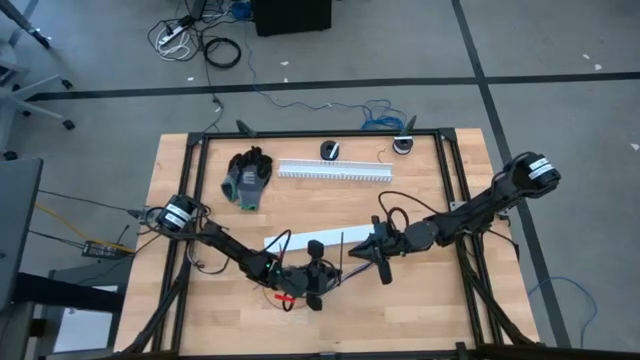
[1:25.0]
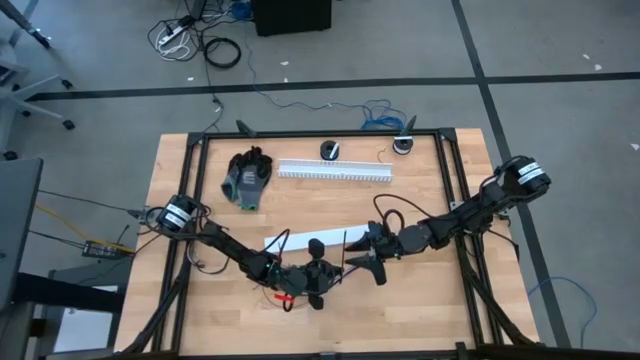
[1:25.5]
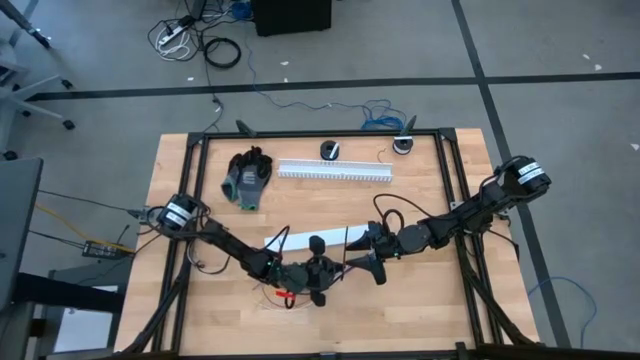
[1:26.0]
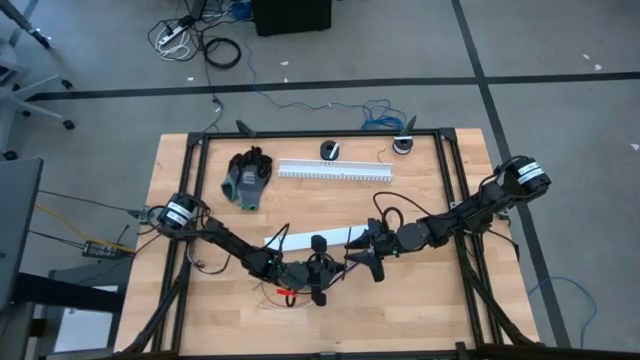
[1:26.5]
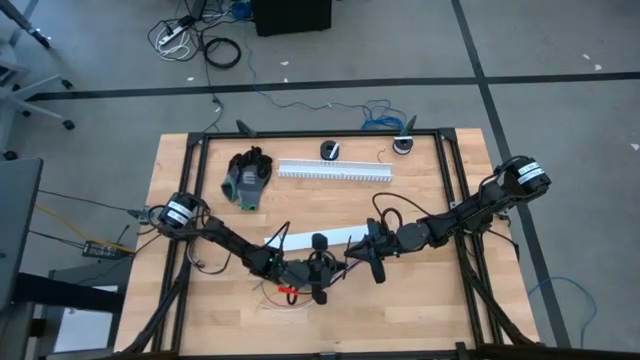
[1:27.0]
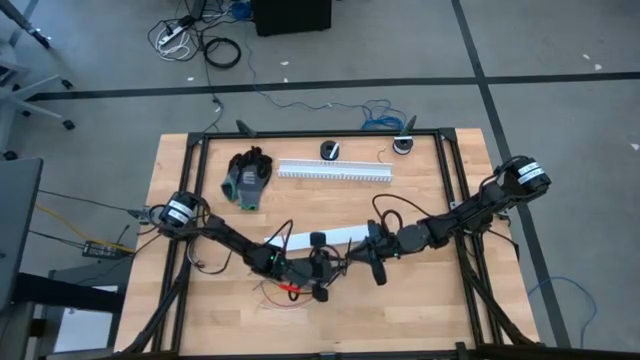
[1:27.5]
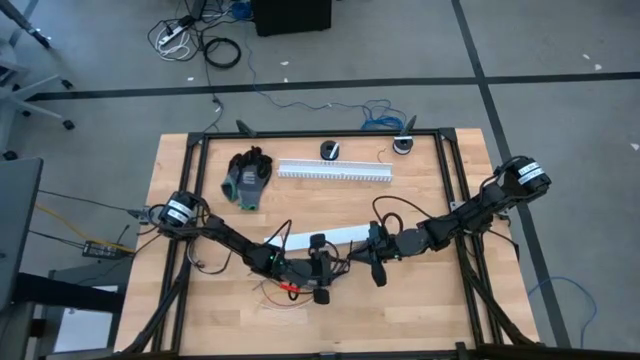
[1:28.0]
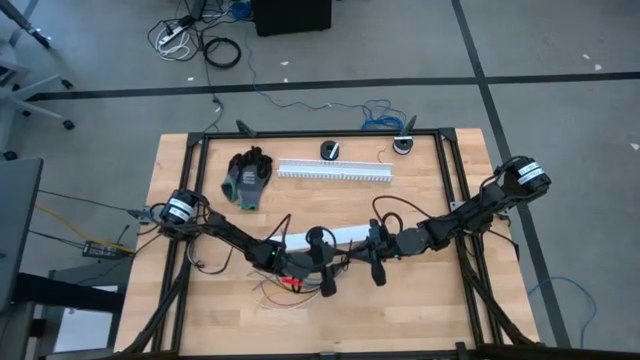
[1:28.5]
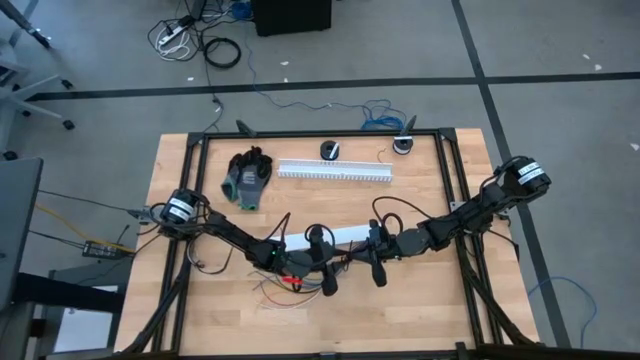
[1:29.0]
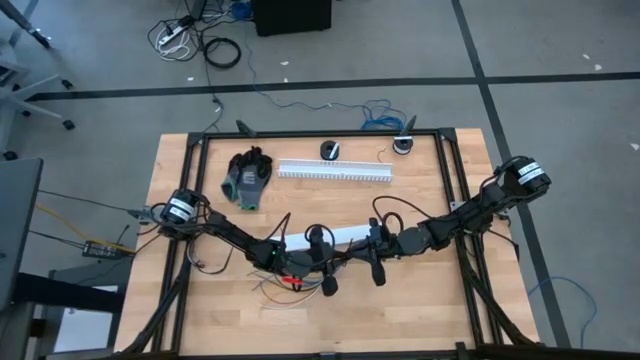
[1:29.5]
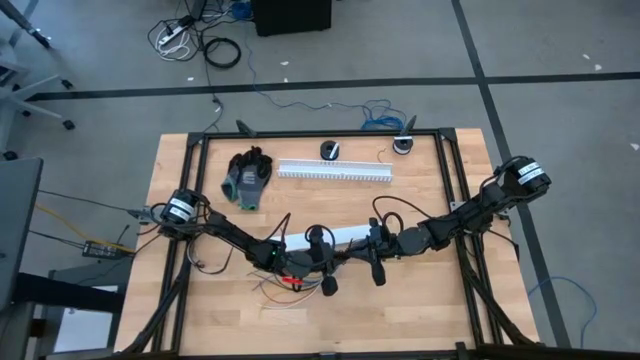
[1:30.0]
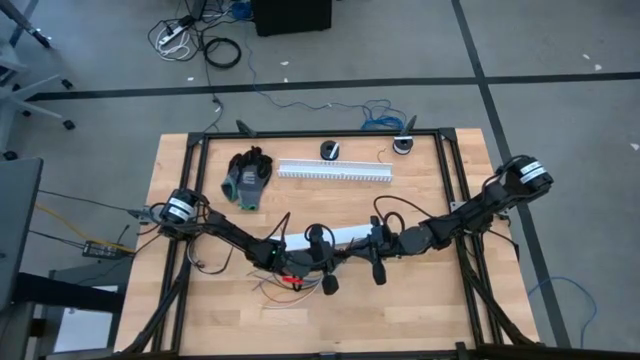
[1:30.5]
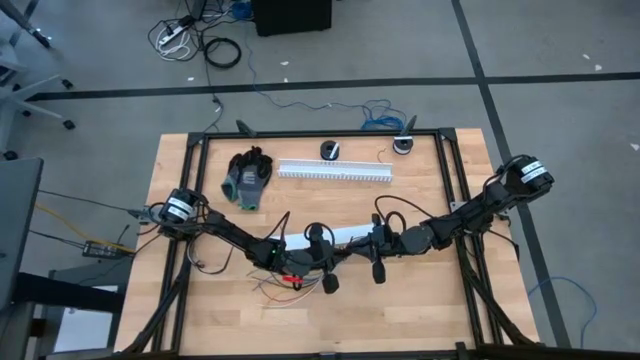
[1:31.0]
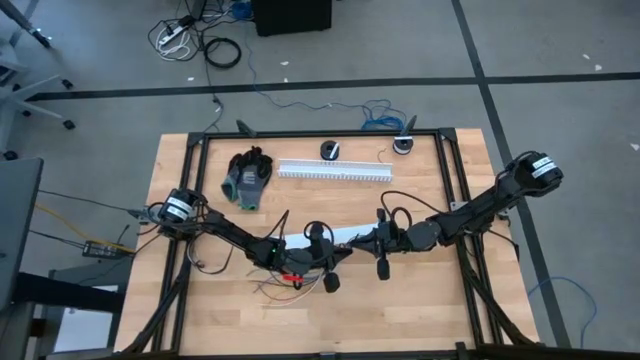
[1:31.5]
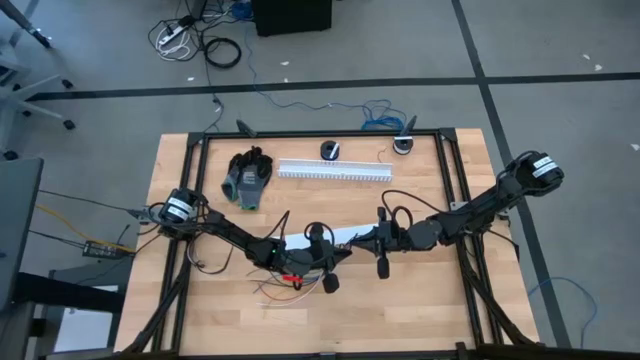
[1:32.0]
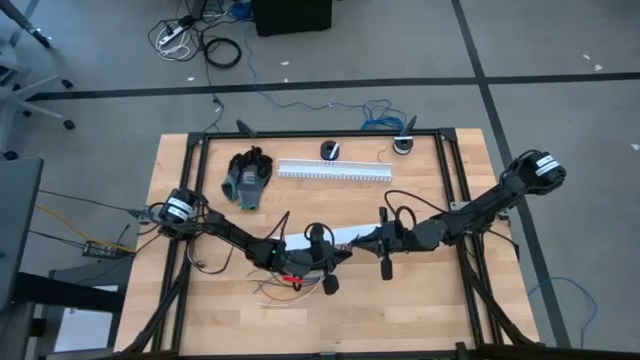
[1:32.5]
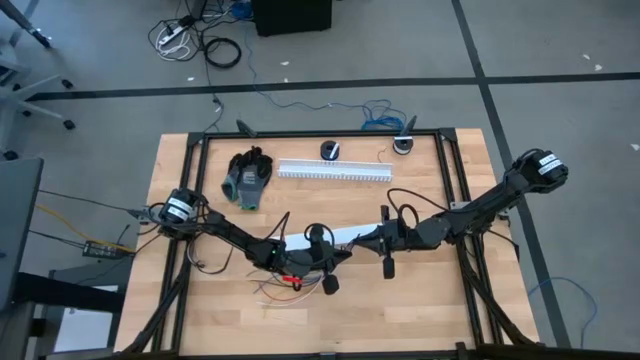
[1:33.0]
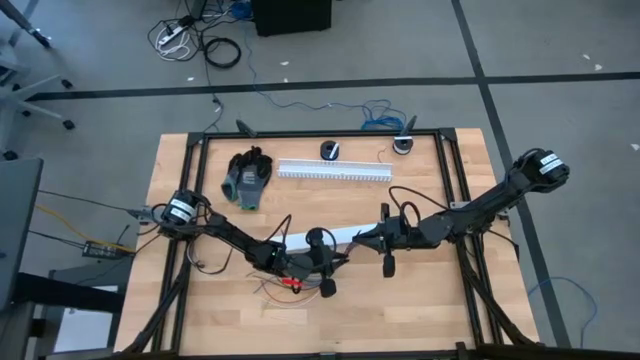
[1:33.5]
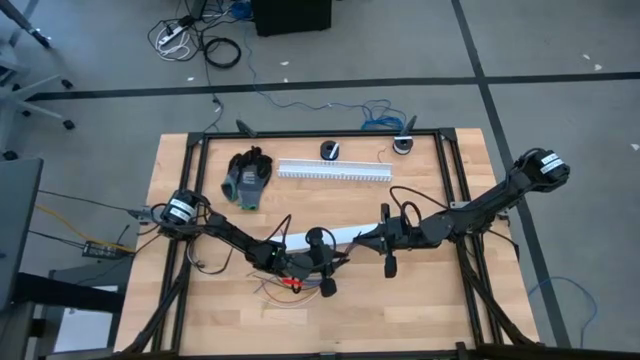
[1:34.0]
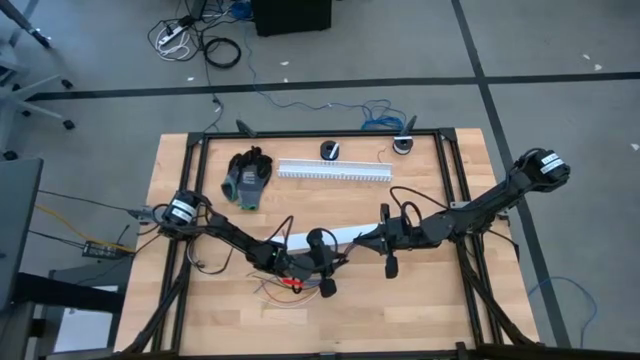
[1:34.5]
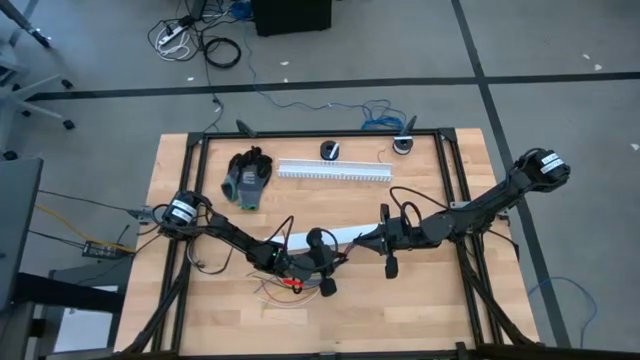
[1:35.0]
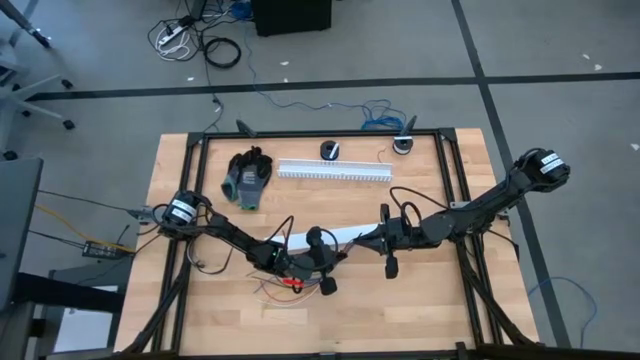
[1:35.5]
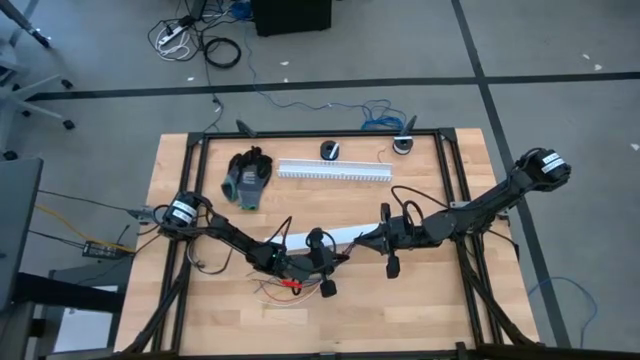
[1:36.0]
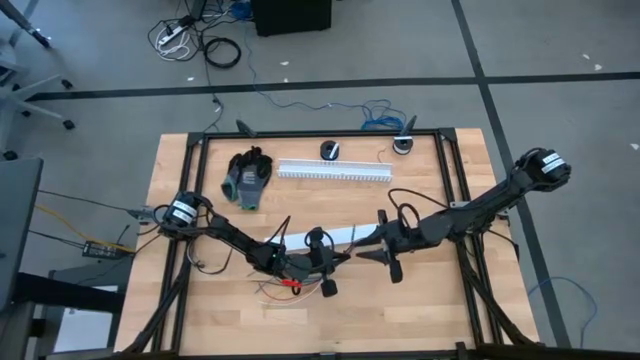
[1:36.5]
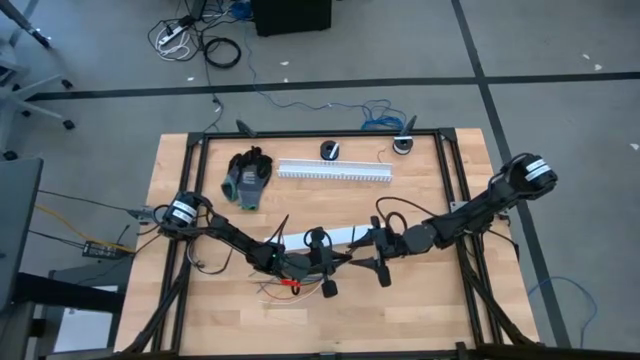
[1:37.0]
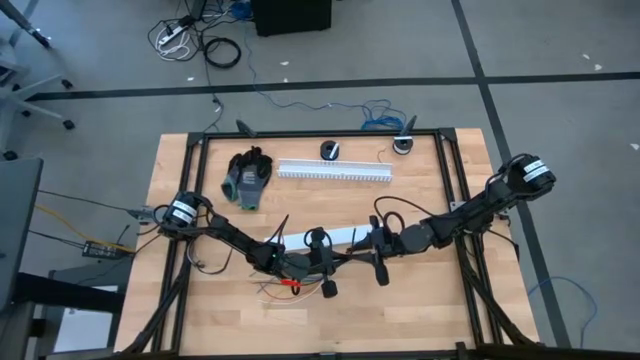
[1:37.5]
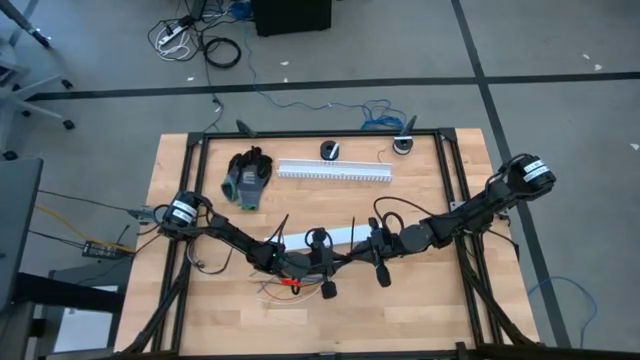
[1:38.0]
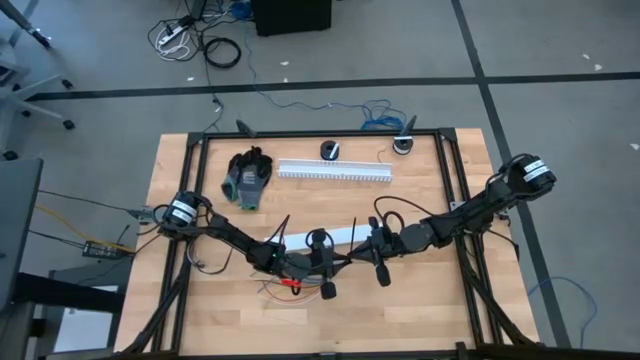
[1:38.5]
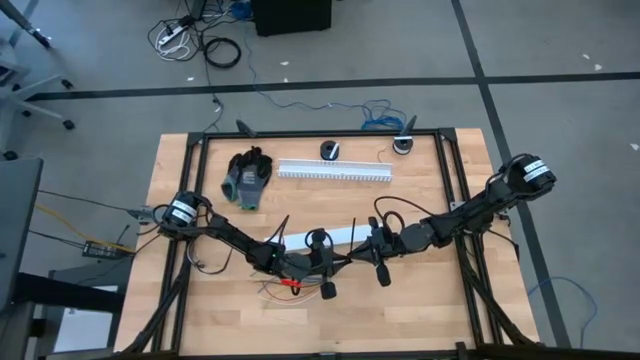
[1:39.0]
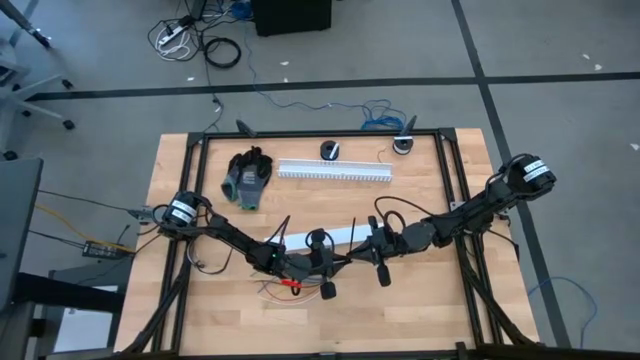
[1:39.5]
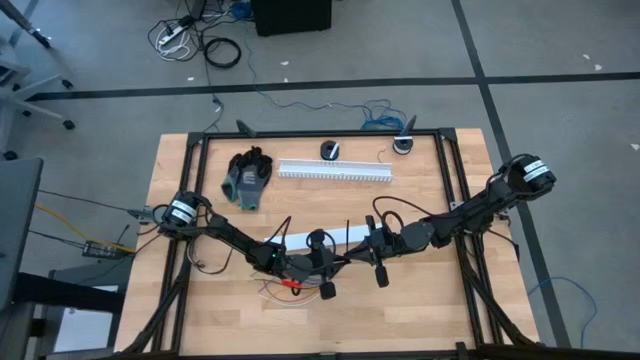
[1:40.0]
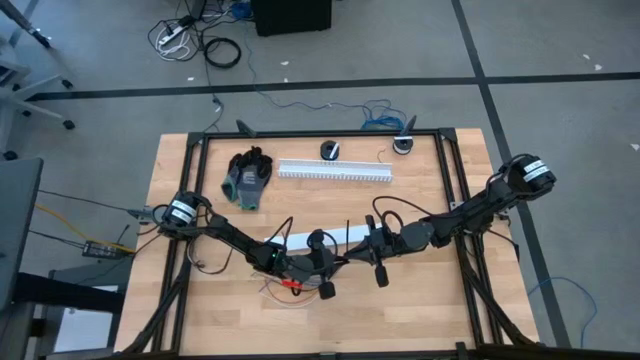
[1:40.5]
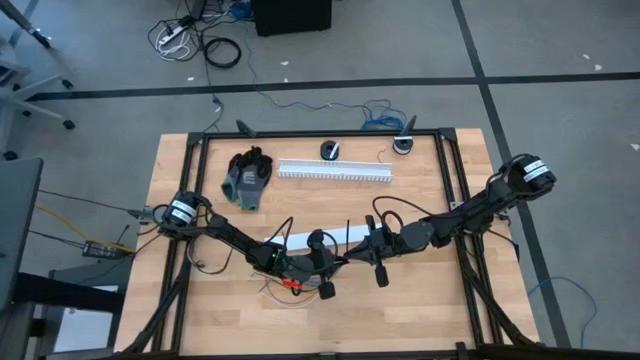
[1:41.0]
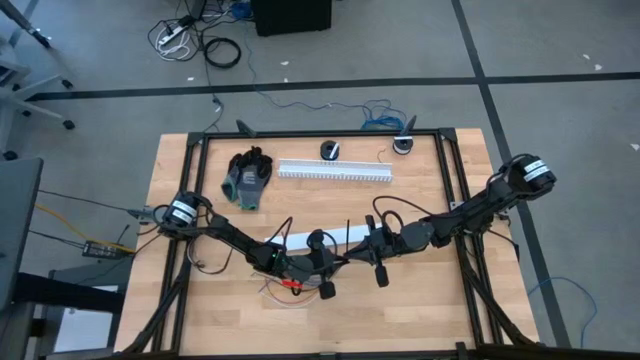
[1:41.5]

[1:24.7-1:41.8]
Task: Ziptie cables
Wrap the black zip tie around the cables

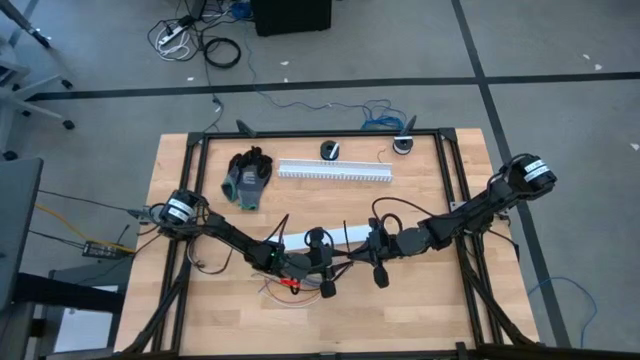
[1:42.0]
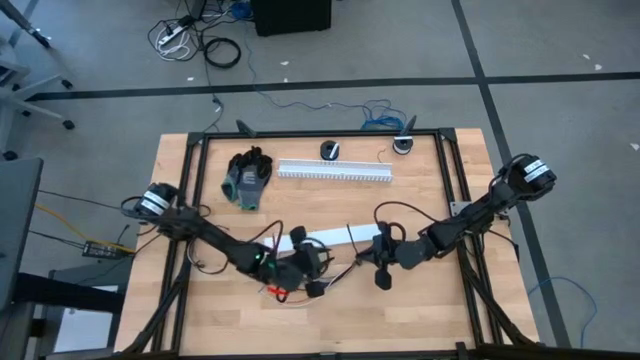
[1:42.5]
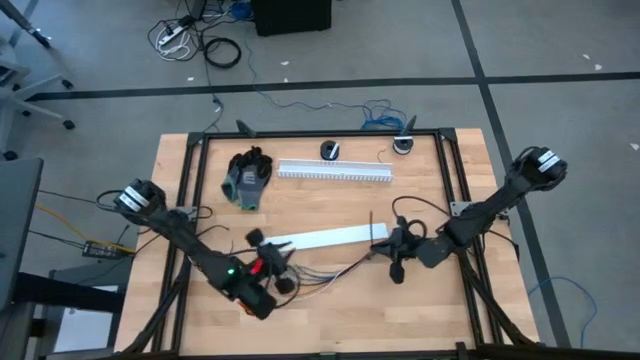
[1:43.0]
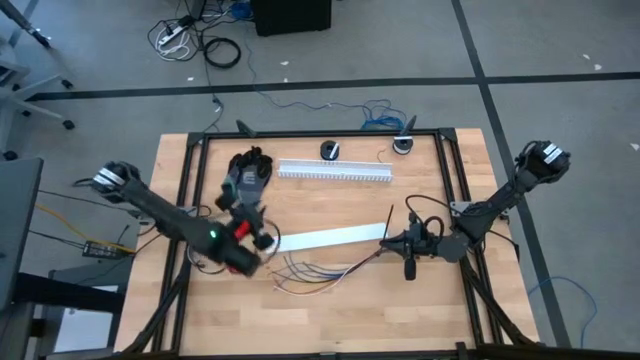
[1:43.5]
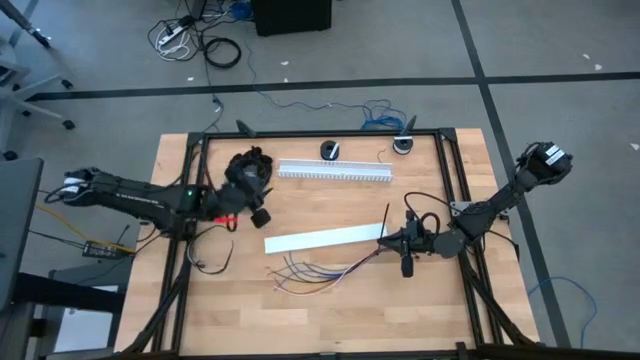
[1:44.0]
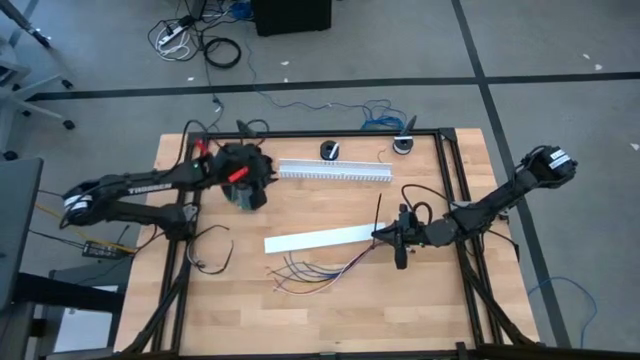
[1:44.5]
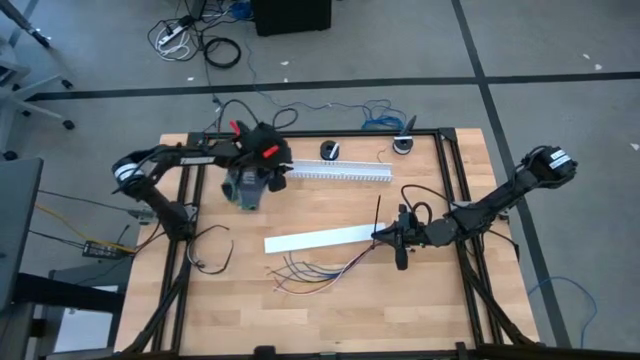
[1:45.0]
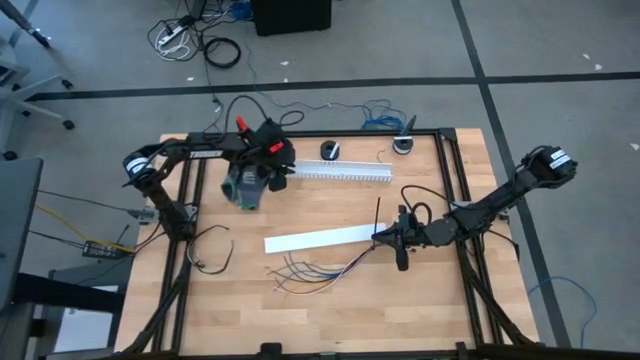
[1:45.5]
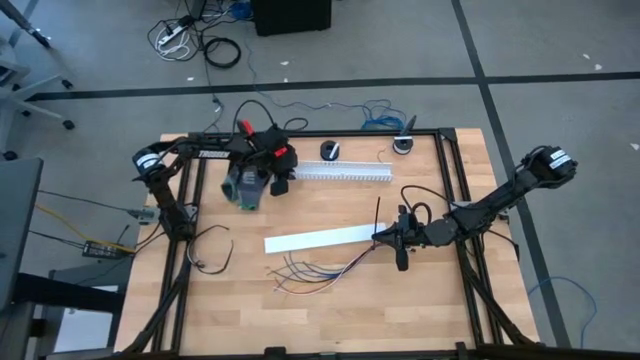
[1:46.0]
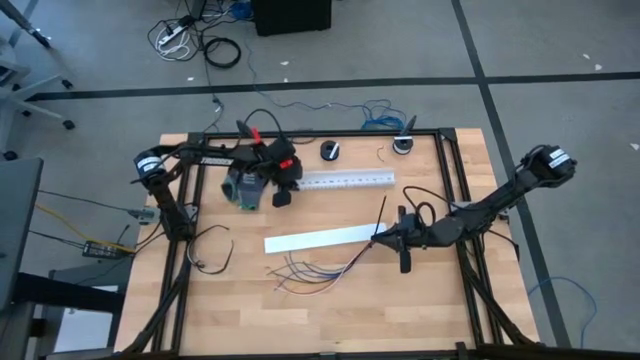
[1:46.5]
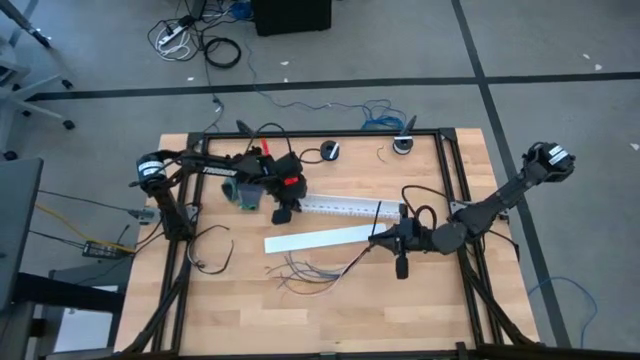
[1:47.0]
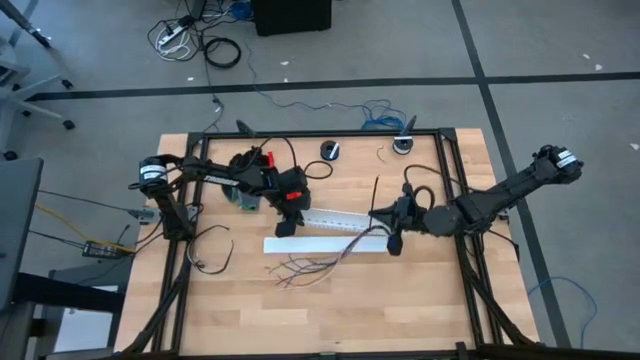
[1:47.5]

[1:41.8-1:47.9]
Move the white cable duct to the center of the table
